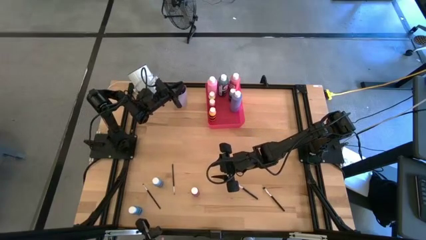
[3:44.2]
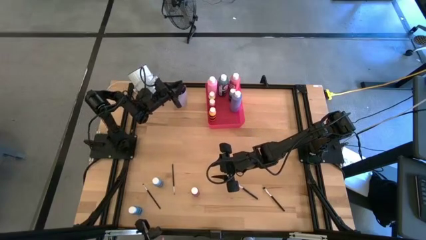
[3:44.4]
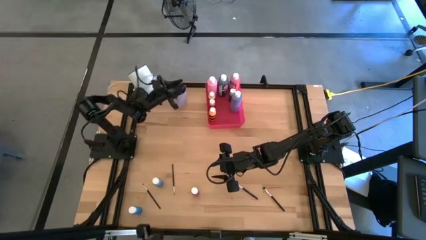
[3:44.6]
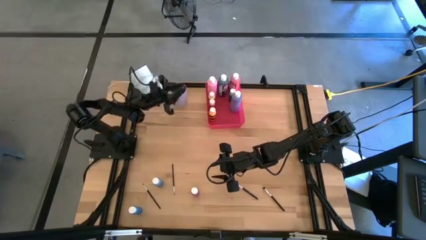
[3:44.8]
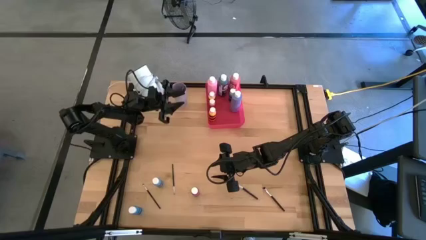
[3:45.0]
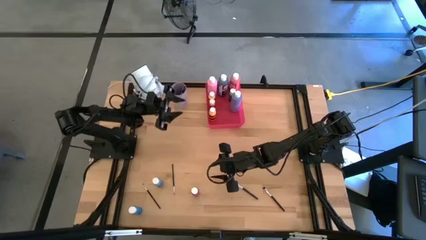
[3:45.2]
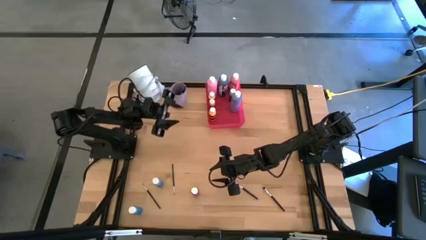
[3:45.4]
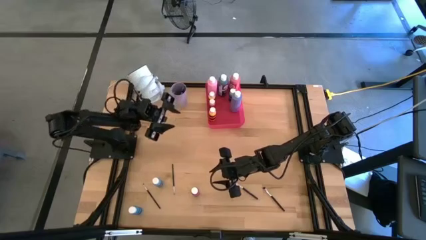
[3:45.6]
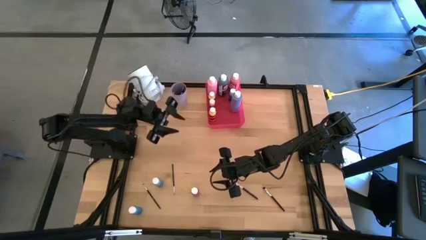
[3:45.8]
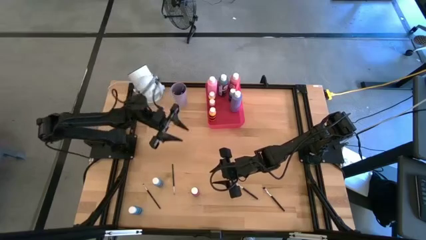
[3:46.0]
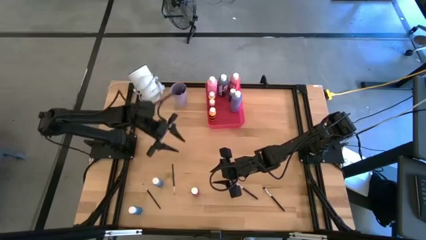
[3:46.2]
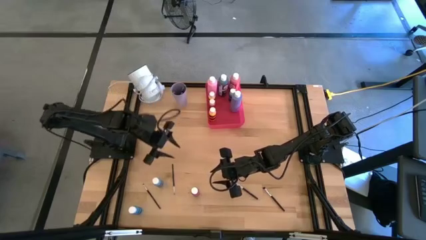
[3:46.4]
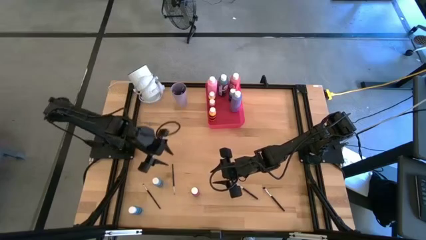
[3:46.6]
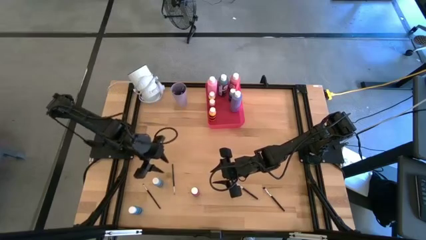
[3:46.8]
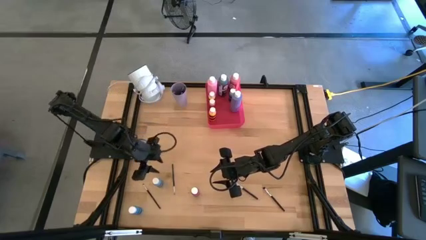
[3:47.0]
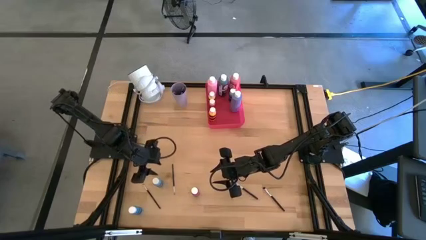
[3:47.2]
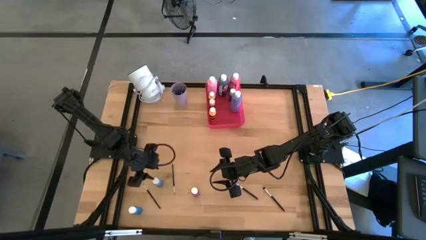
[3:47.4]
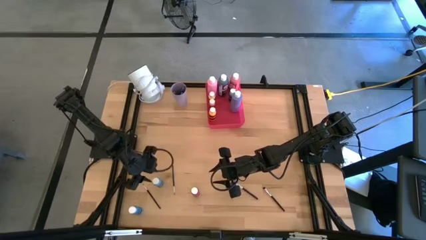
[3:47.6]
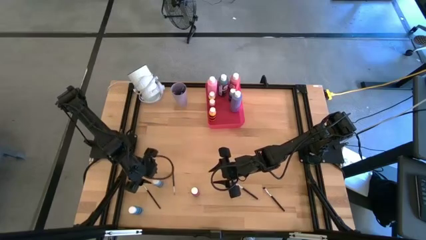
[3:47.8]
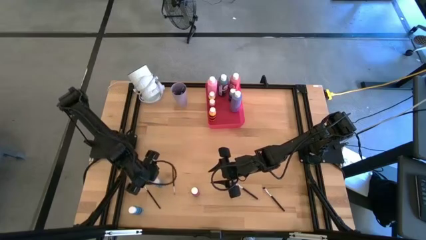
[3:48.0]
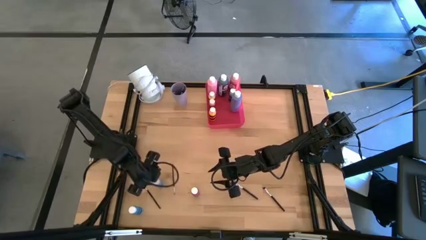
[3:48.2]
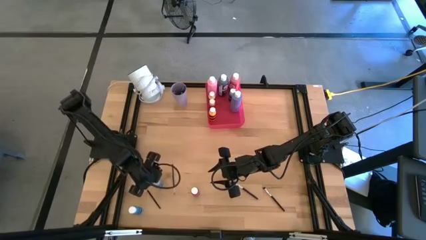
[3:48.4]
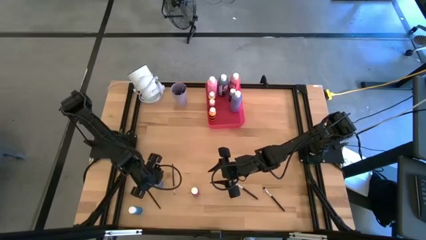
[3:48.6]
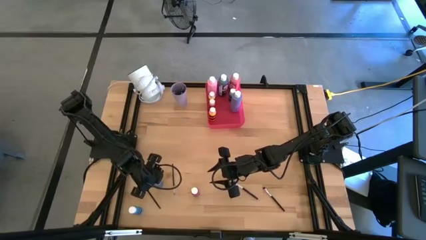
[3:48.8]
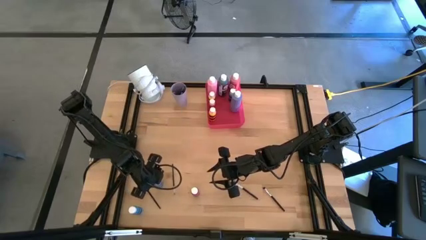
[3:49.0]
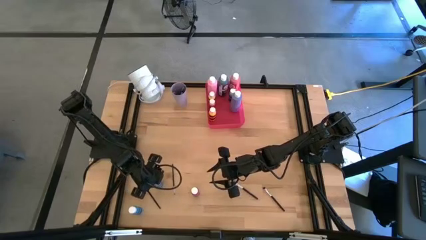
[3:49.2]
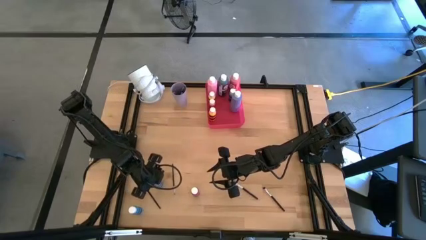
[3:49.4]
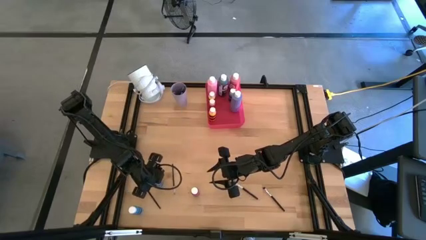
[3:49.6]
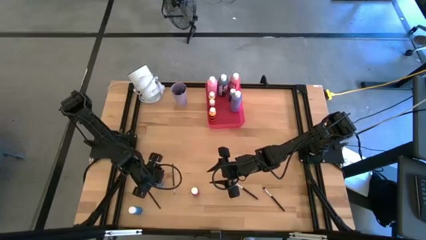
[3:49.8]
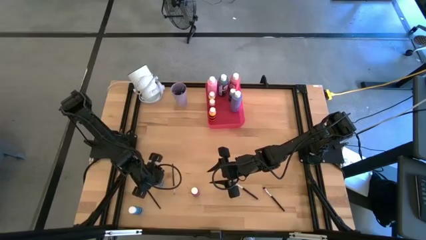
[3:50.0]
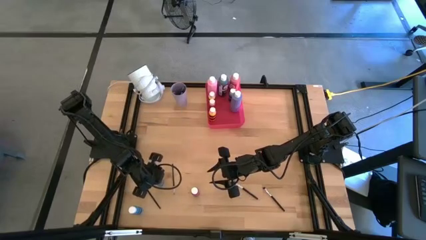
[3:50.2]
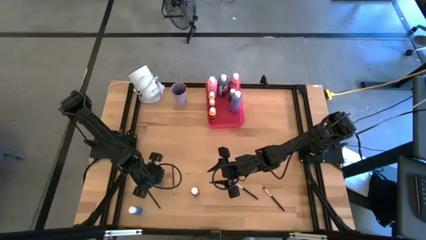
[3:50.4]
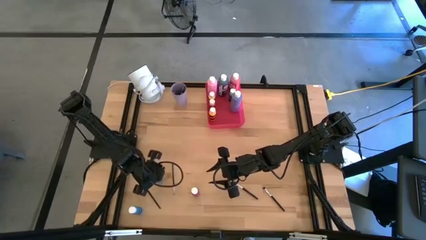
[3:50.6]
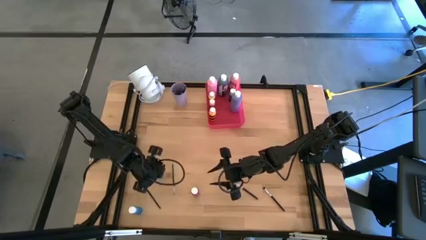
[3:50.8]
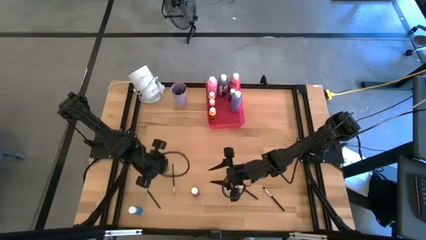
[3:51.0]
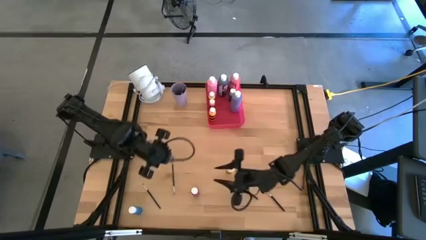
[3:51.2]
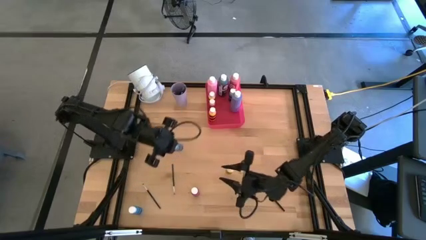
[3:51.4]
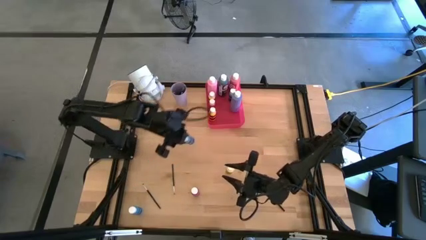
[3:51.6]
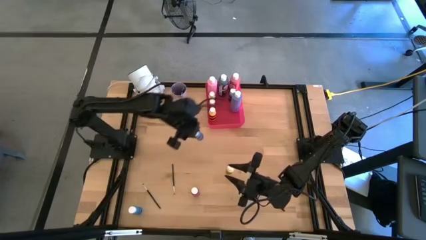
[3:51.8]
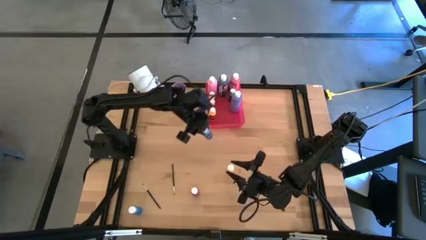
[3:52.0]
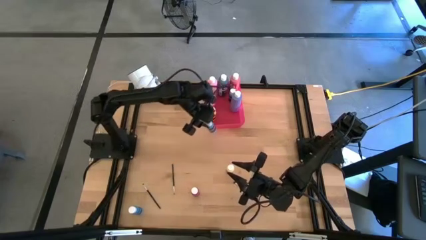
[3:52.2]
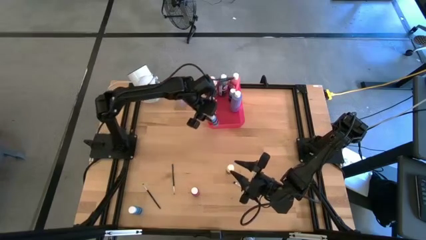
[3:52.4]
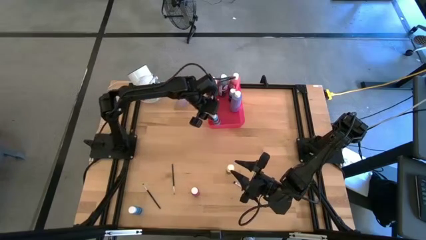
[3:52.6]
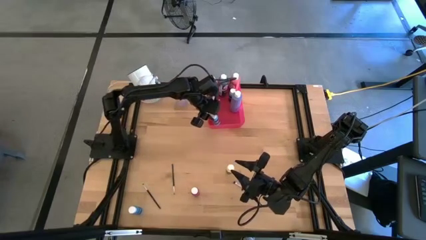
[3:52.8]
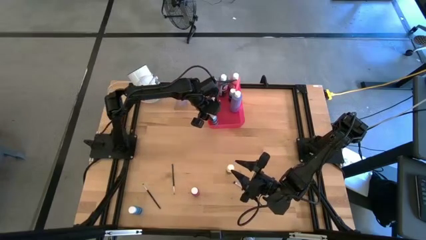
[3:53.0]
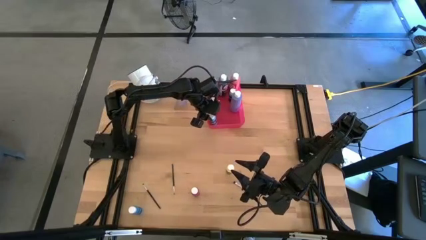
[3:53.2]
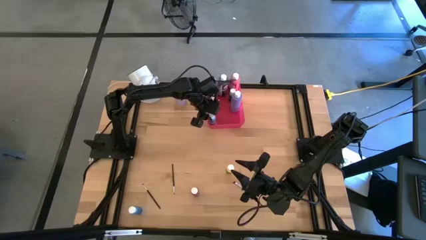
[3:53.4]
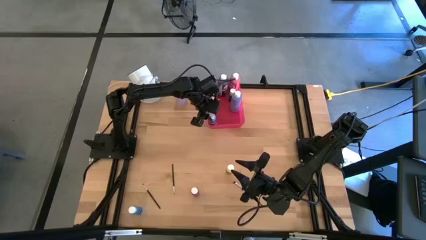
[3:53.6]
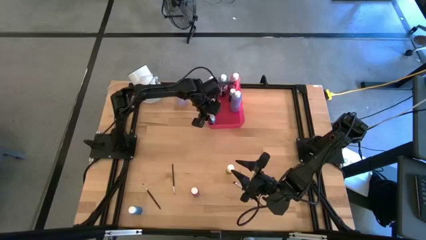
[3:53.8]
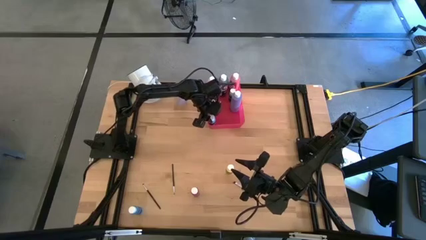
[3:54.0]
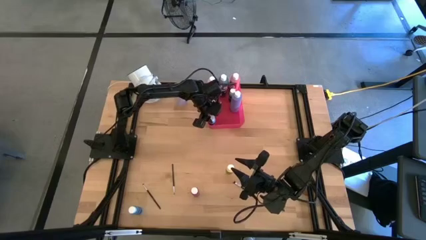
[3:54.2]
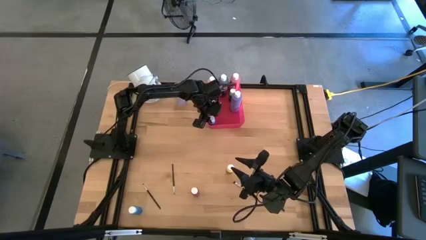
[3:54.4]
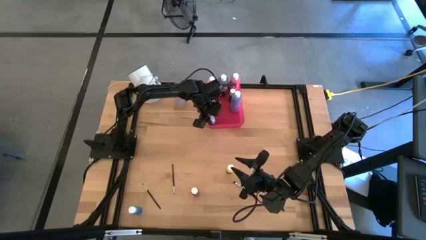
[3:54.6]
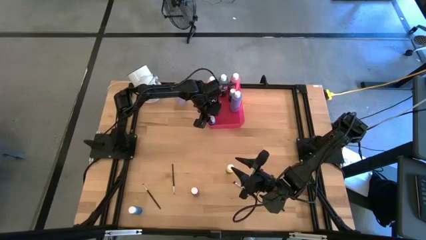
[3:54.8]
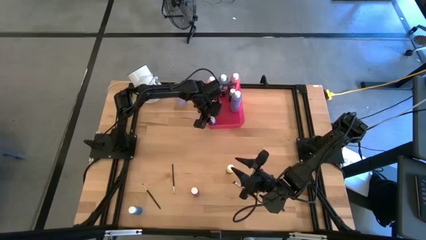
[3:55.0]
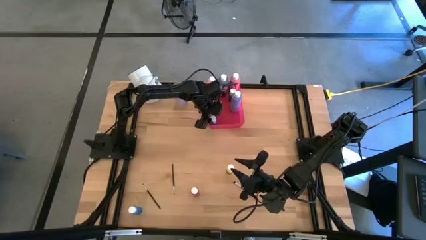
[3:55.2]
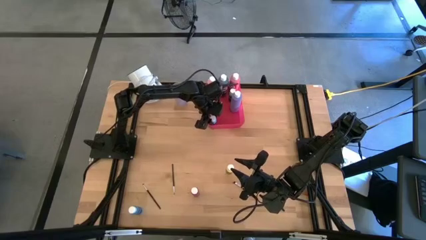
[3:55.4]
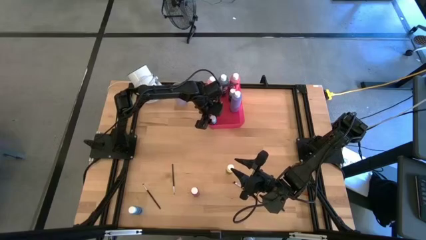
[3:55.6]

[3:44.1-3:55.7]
Task: Pick & Place Paint Supplies
Put the top left blue paint bottle into the red bin

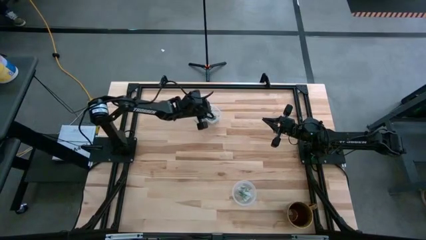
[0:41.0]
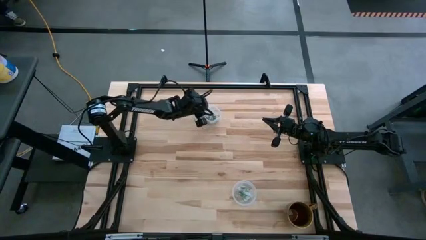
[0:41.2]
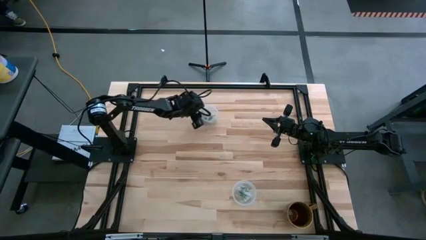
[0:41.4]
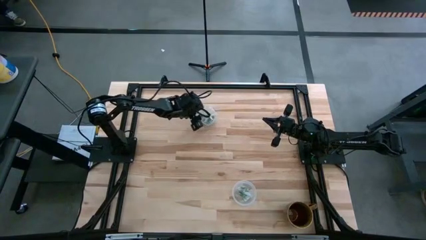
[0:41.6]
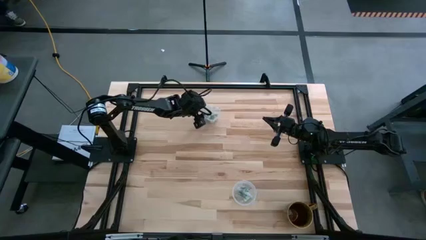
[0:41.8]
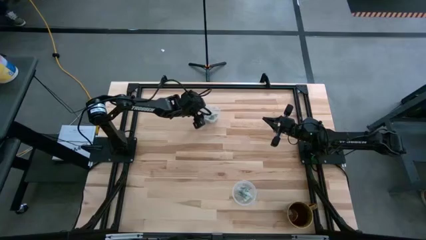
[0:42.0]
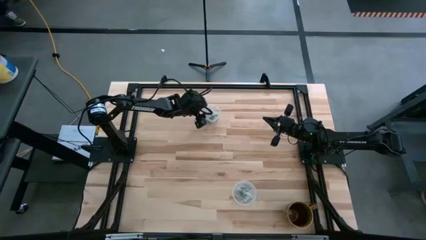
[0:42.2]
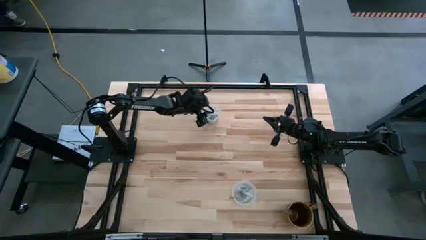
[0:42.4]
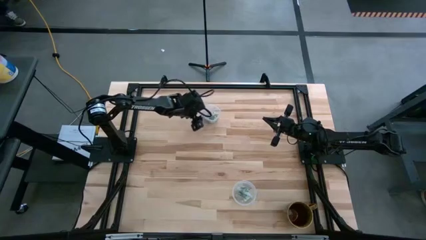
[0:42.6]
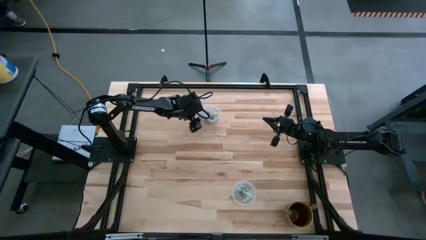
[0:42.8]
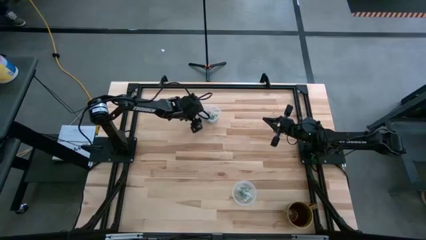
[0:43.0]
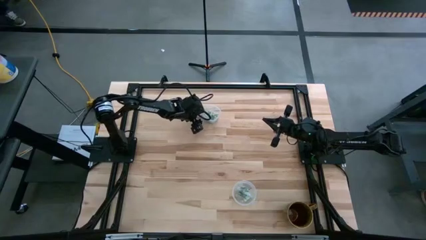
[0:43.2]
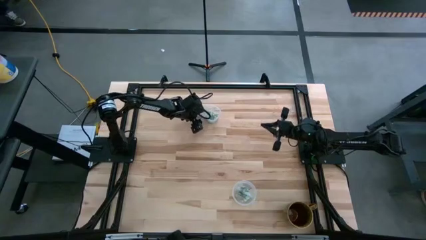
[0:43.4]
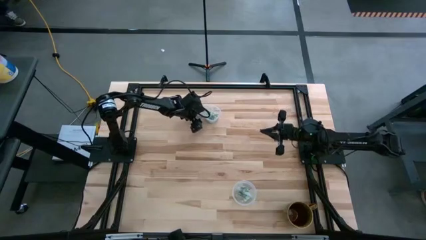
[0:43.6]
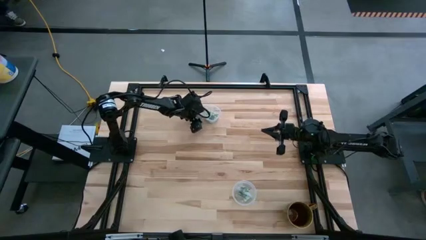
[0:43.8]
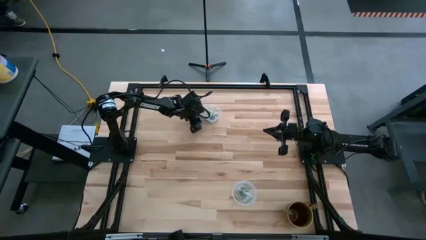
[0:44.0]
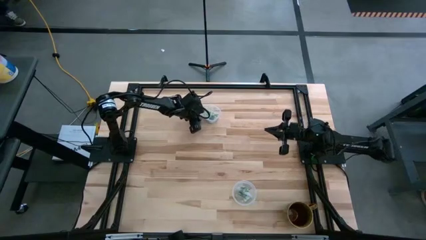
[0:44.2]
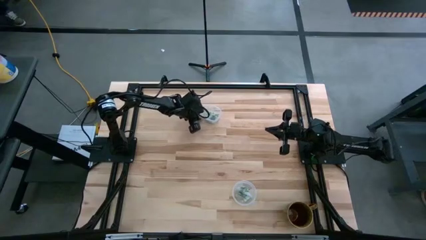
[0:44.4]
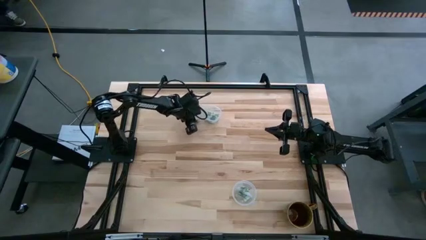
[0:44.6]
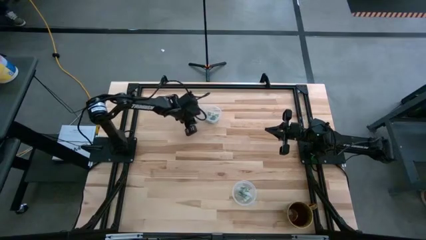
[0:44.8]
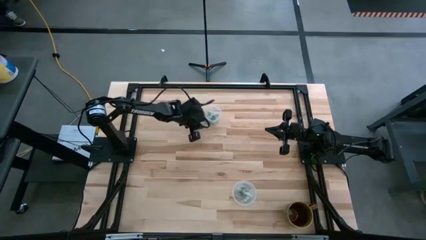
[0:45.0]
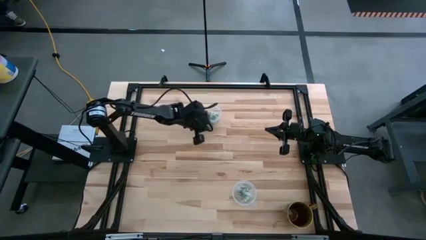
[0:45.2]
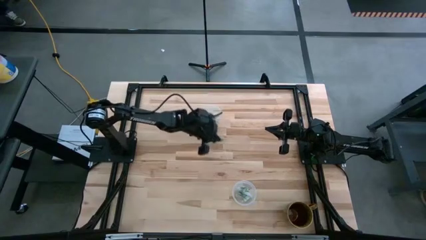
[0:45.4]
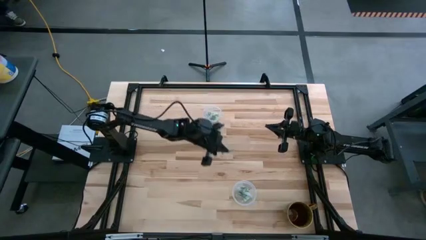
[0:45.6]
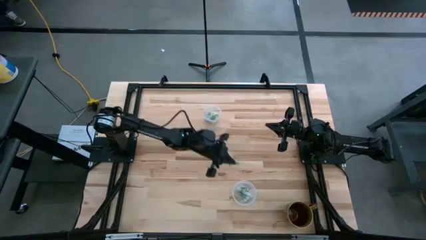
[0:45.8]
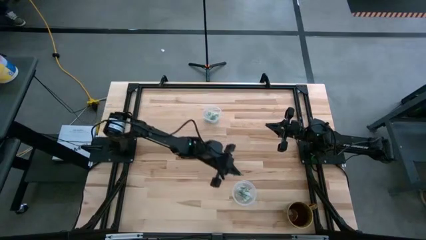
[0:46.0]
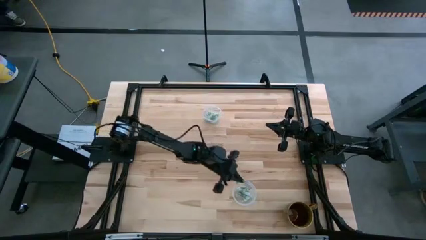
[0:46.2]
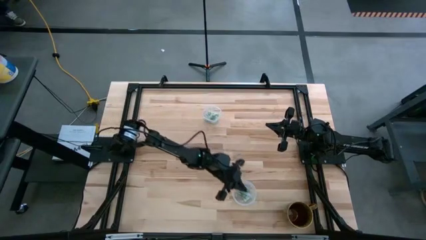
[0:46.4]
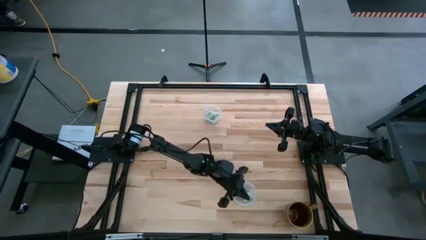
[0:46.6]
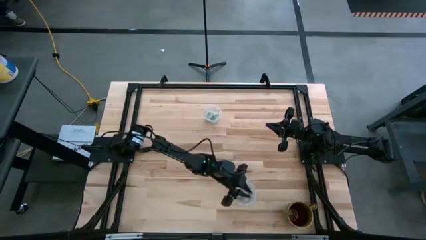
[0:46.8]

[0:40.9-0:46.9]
Task: Pick and place Stevia / Truvia into bins
Put the stevia packet into the bottom transparent container
